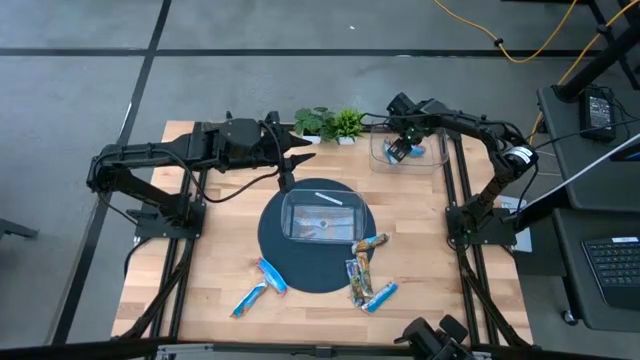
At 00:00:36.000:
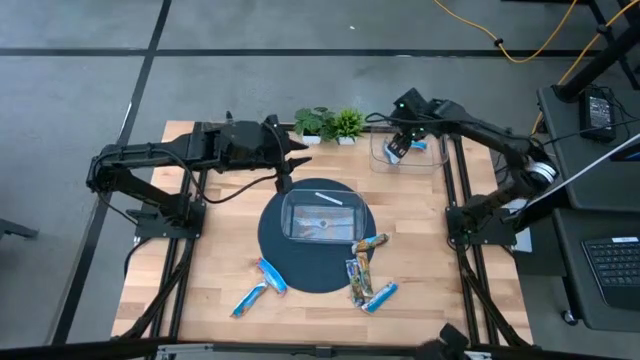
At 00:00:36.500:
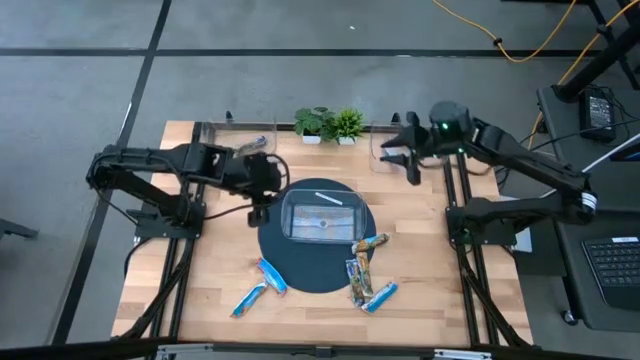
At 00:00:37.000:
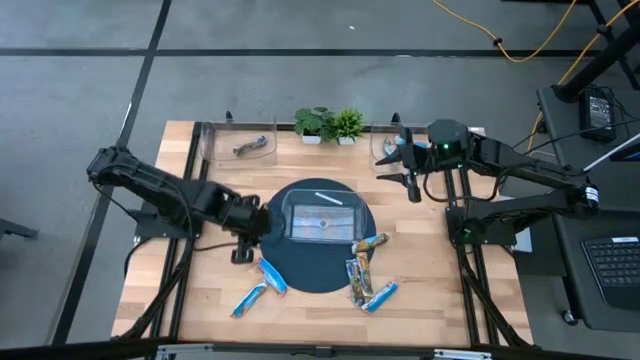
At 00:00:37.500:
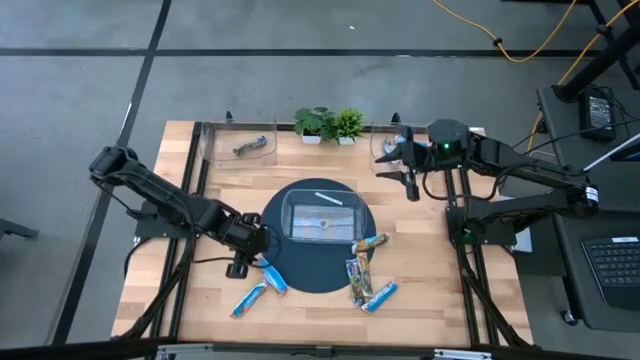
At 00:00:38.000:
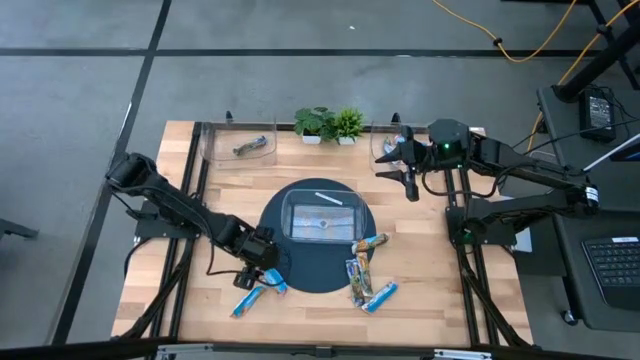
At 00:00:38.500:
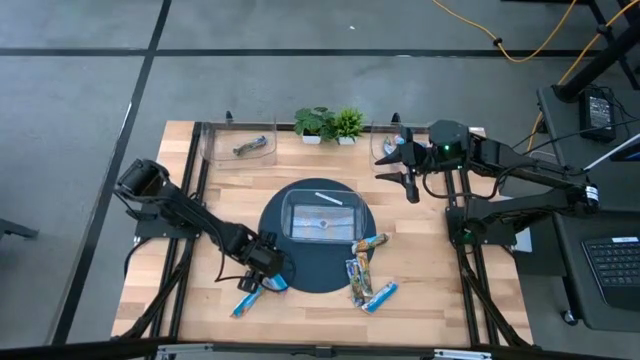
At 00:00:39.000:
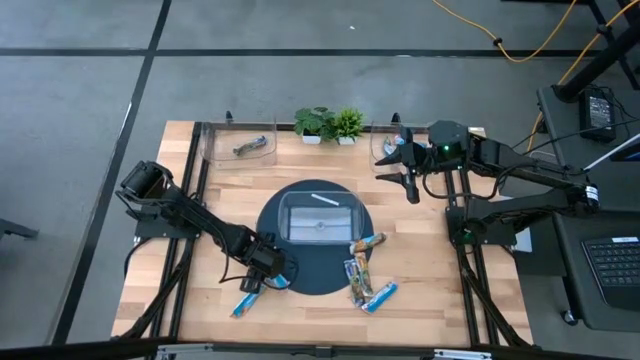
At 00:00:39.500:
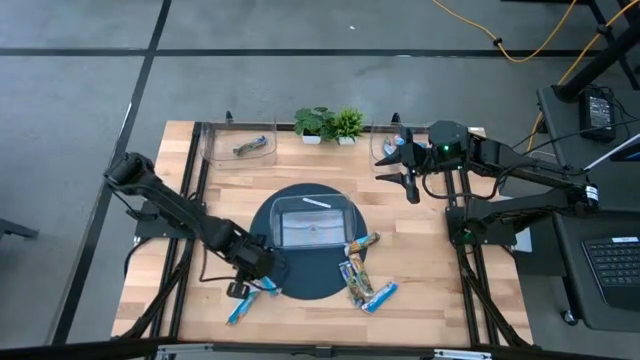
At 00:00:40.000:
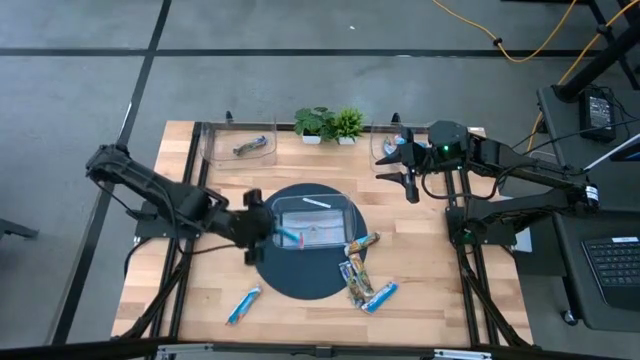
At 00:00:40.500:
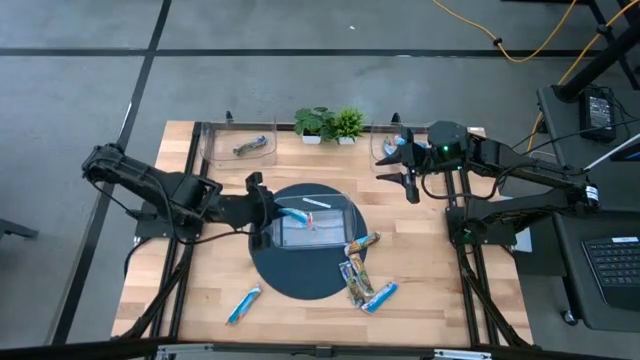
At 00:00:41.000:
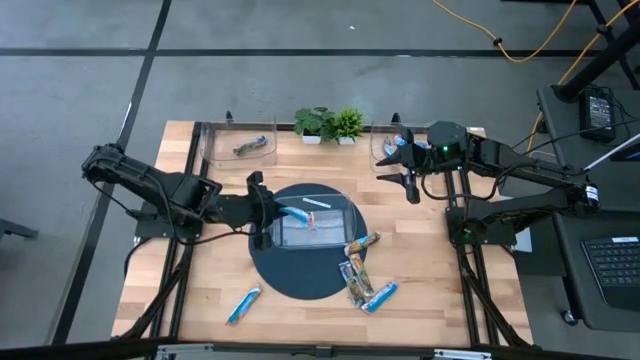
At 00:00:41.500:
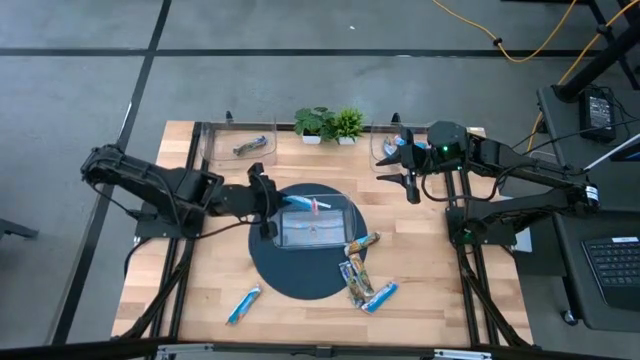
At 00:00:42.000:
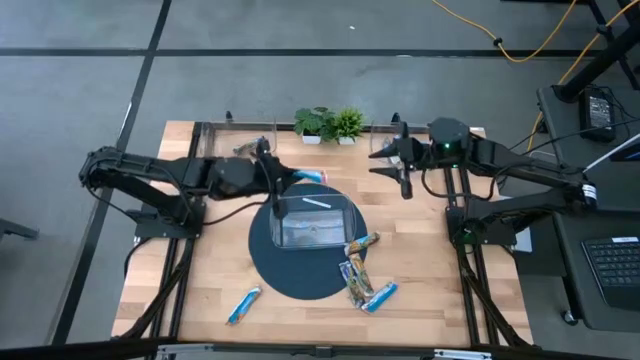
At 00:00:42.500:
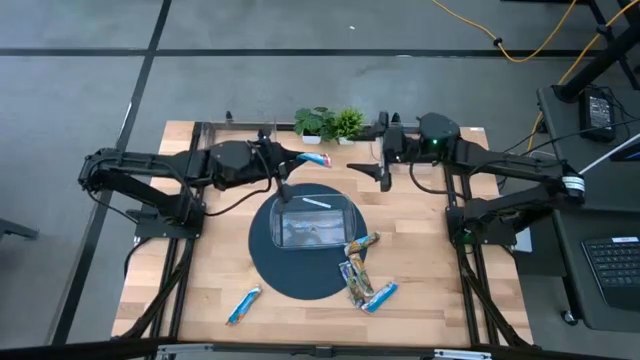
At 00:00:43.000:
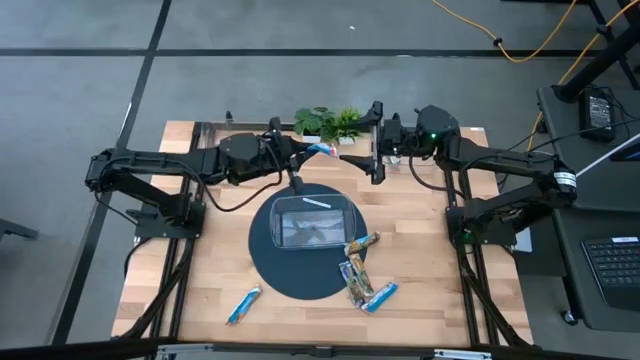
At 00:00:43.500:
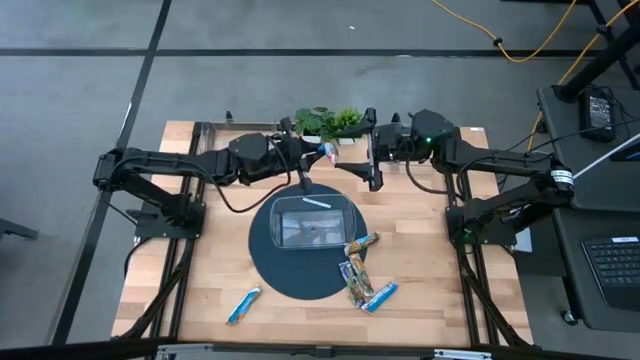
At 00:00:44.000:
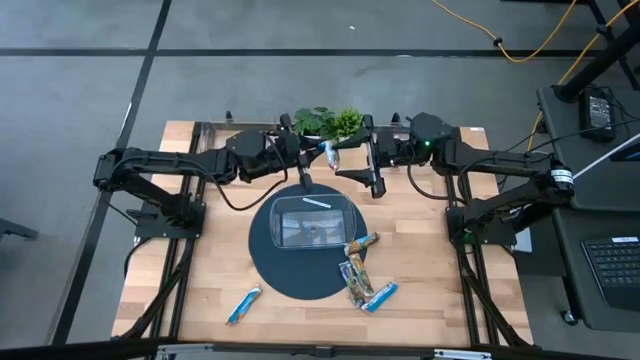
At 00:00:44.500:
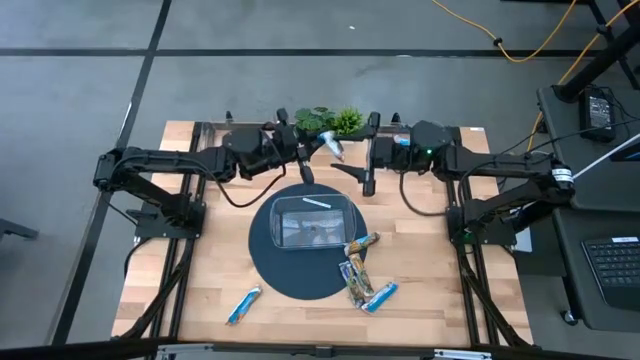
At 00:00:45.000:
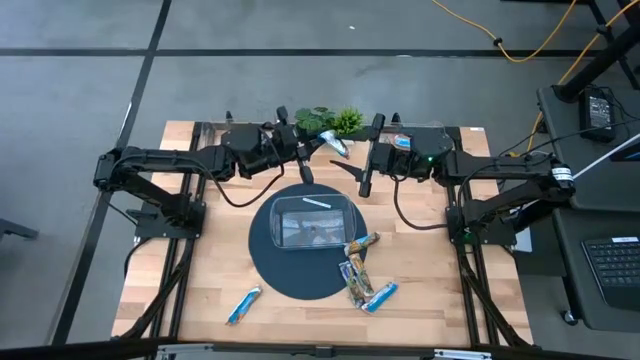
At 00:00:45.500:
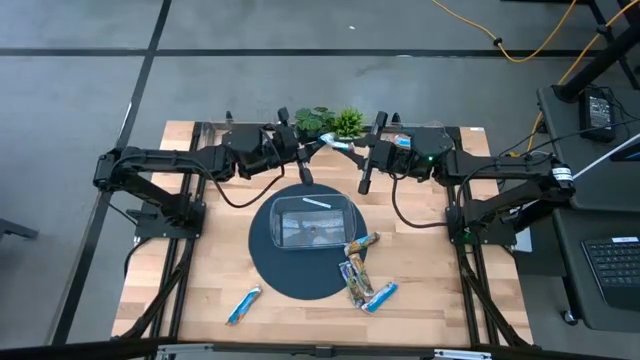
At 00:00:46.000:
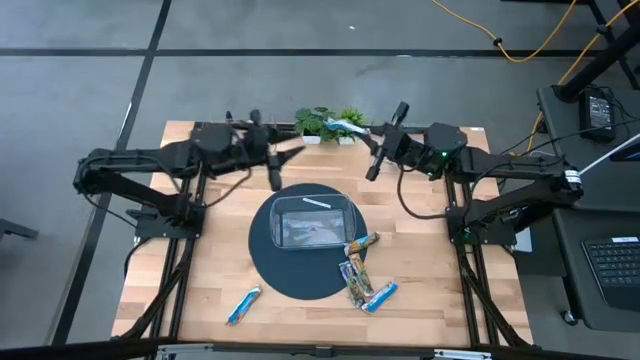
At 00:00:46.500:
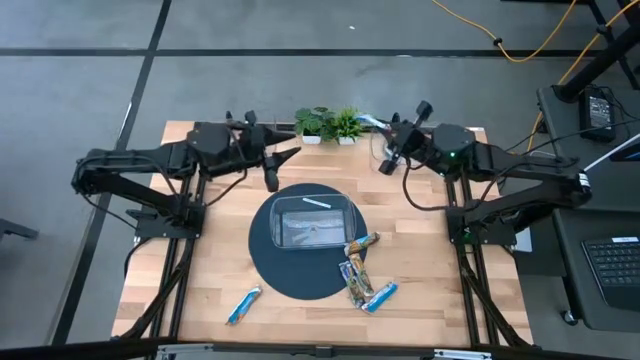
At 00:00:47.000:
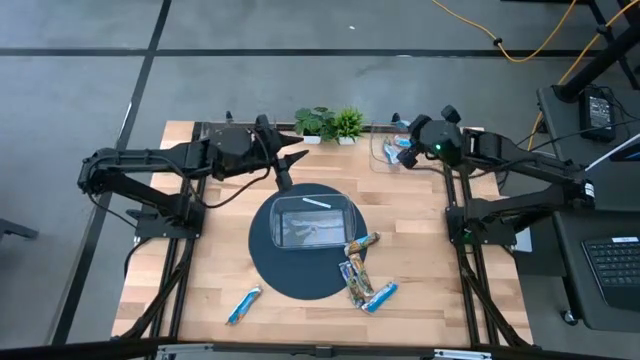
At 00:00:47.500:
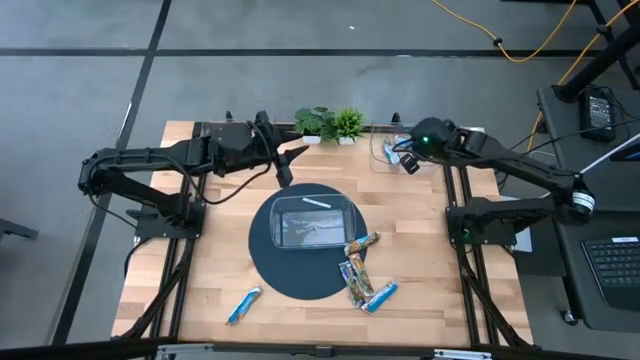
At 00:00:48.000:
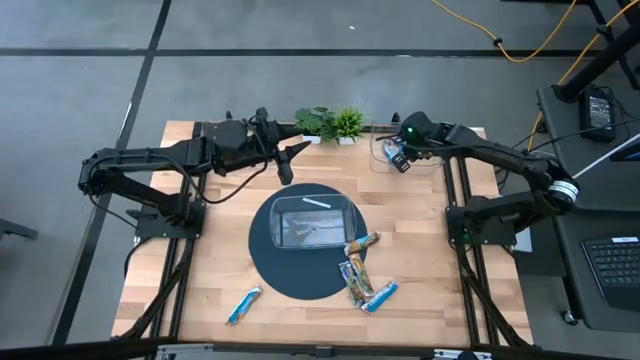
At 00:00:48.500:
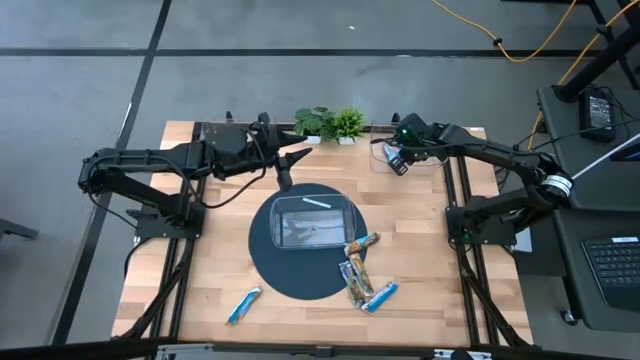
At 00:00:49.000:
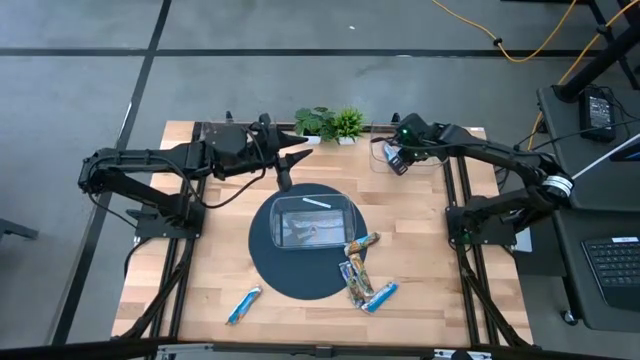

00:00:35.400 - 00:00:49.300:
Task: Pick and place Granola Bars by type
Put the red granola bar into the top right transparent bin

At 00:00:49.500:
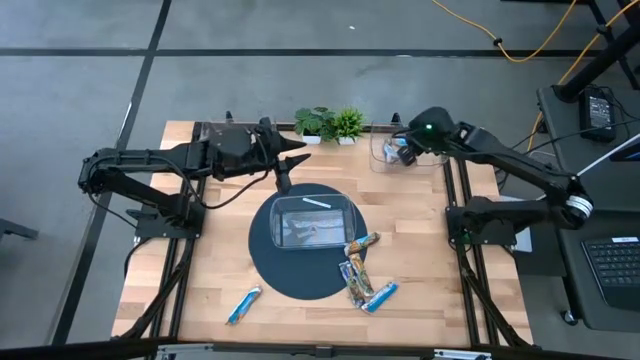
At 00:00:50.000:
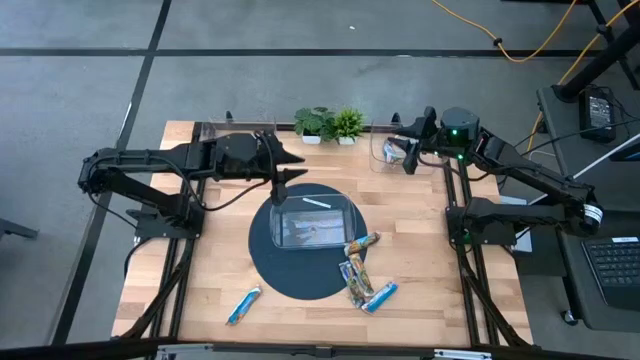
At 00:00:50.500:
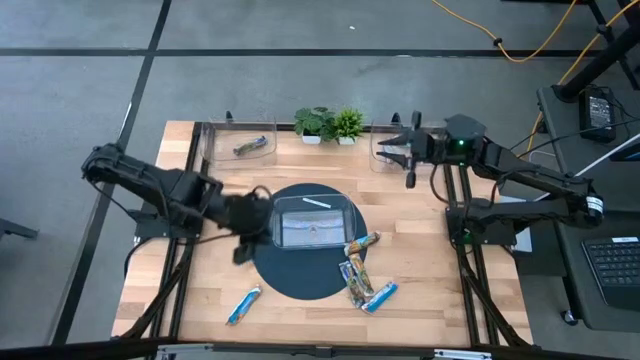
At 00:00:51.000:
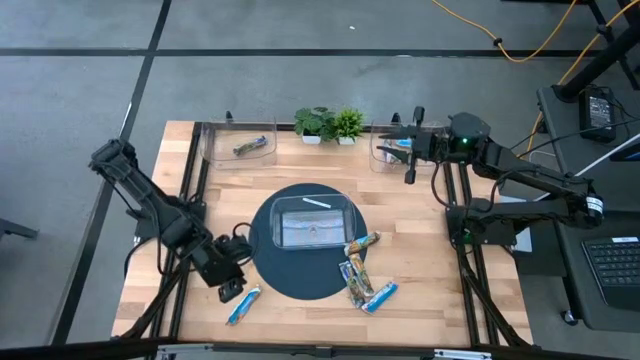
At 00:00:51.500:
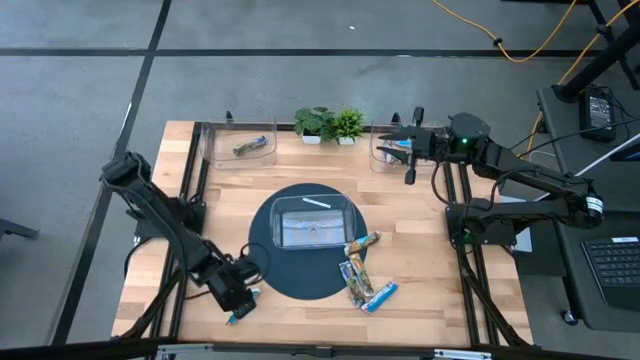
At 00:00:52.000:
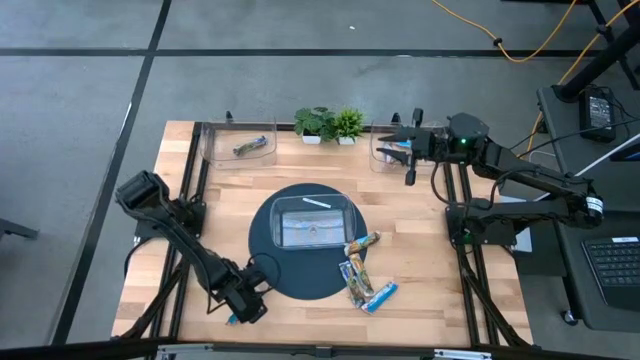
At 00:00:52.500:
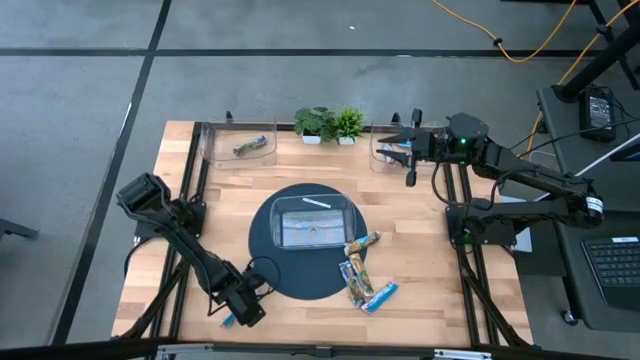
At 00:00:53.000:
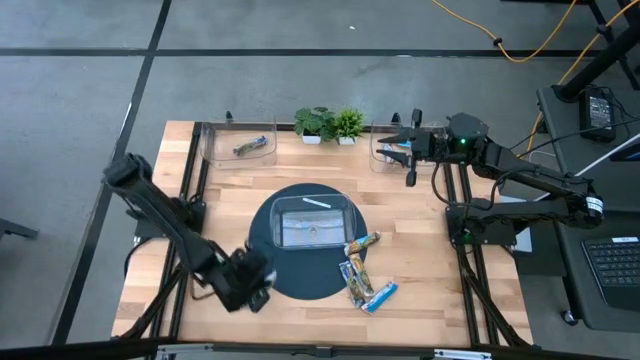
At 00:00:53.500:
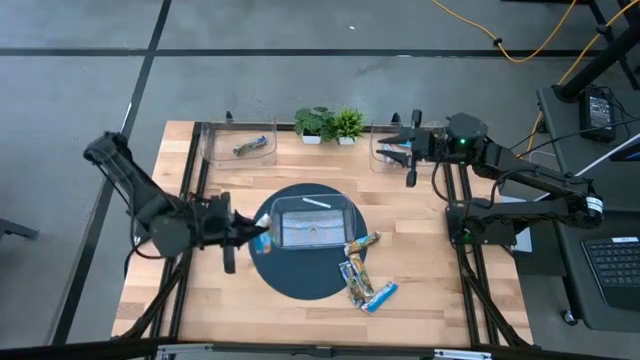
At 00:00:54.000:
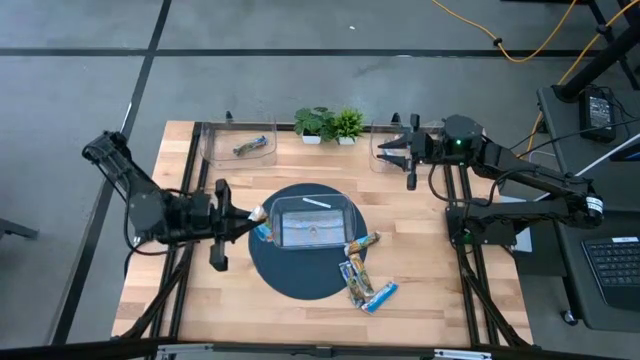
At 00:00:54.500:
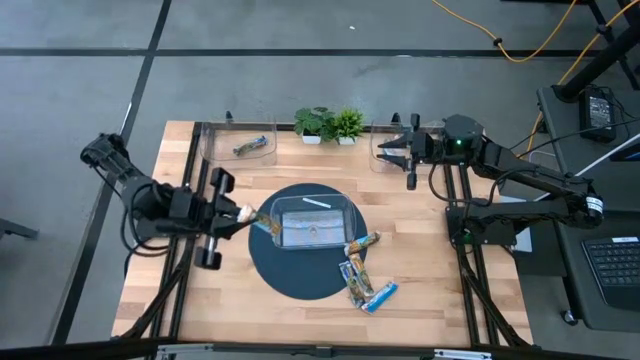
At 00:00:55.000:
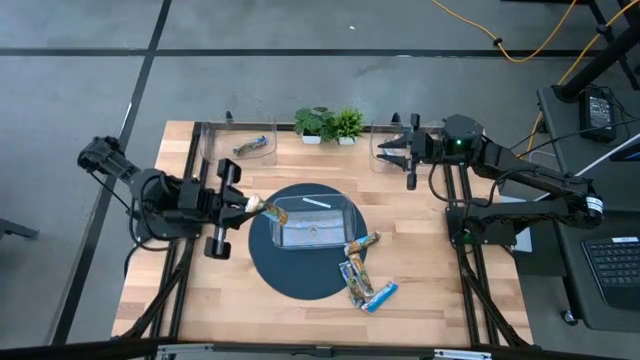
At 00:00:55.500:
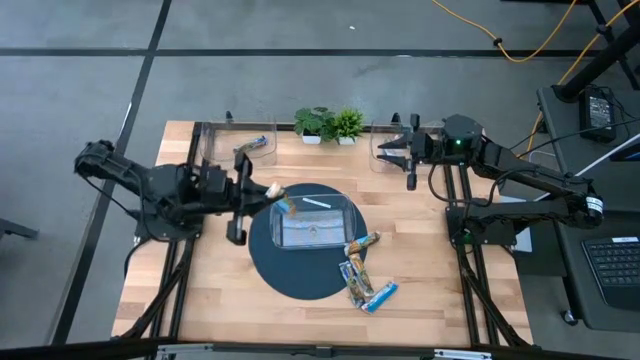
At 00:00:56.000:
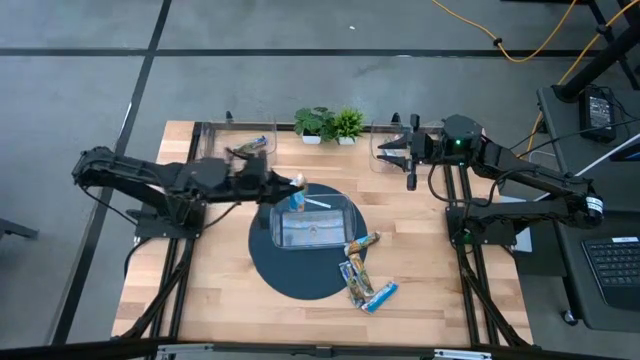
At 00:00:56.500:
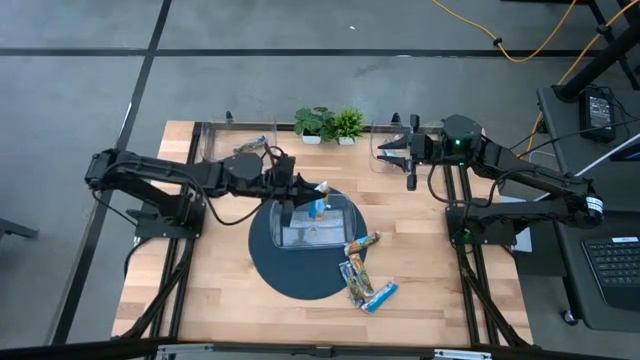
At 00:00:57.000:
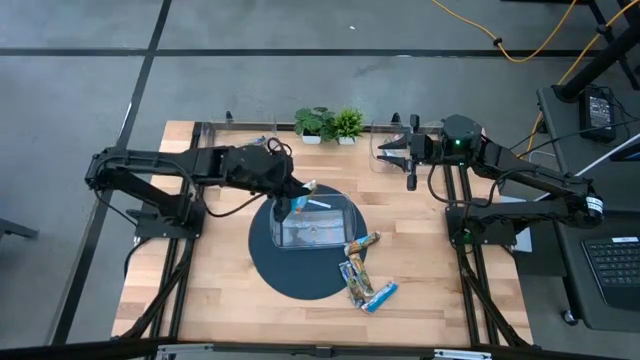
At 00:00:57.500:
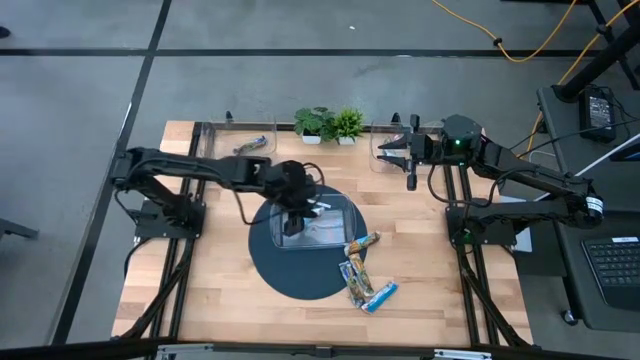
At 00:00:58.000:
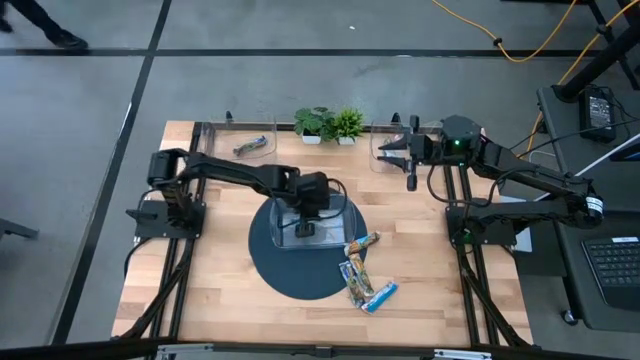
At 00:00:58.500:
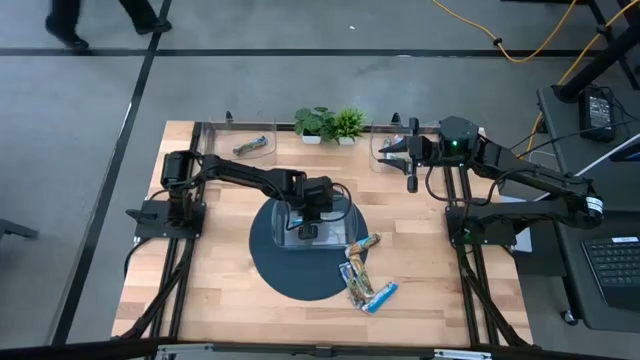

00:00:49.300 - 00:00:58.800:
Put the yellow granola bar into the bottom transparent bin
